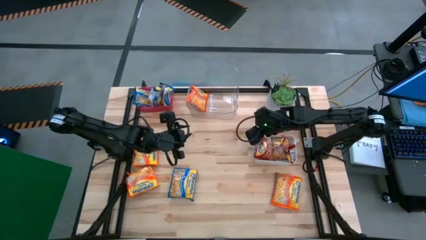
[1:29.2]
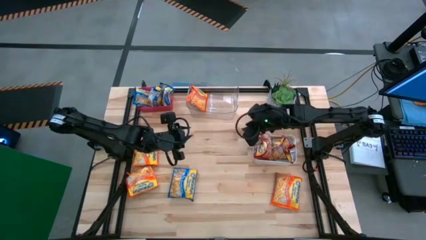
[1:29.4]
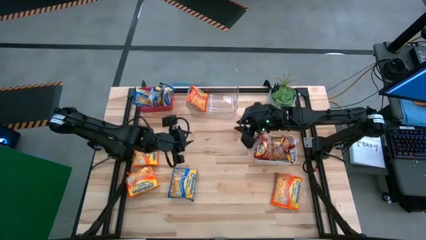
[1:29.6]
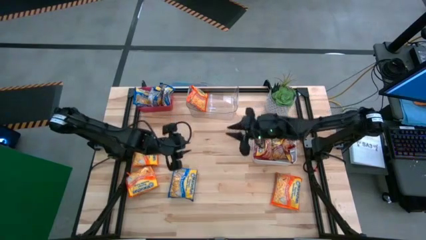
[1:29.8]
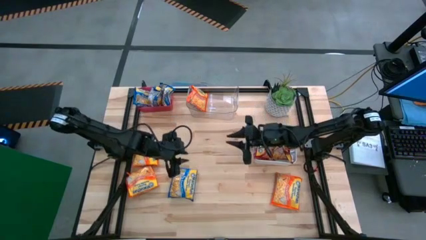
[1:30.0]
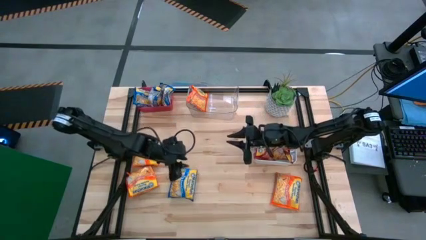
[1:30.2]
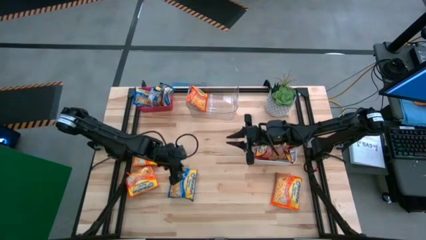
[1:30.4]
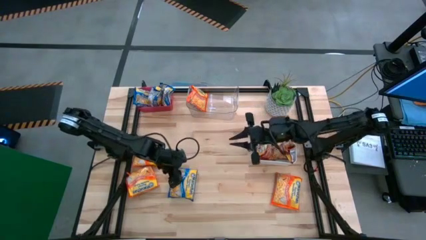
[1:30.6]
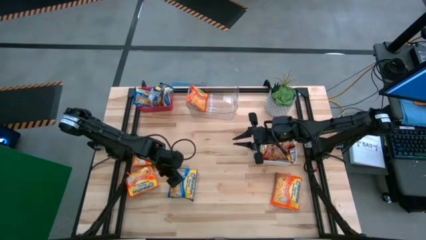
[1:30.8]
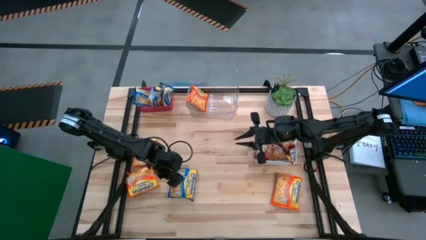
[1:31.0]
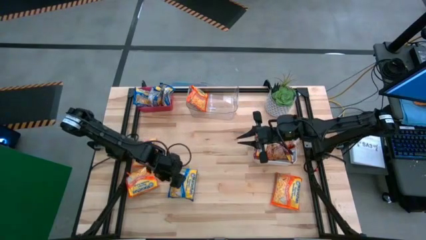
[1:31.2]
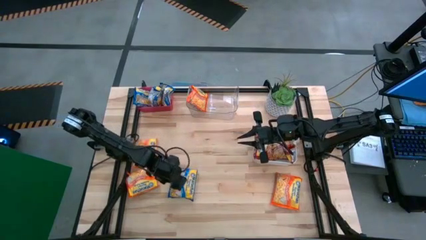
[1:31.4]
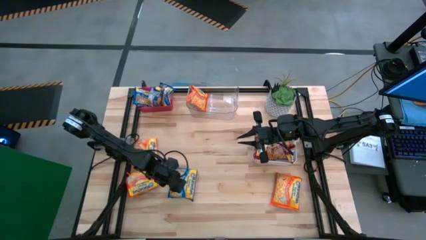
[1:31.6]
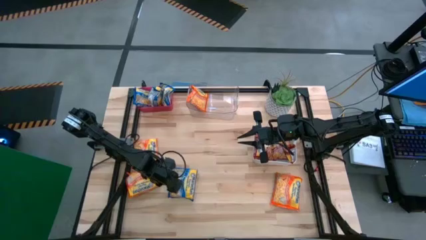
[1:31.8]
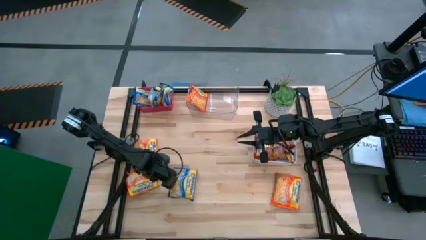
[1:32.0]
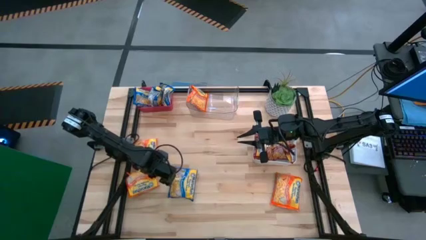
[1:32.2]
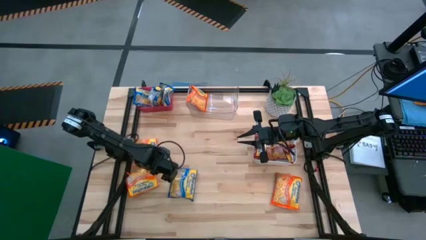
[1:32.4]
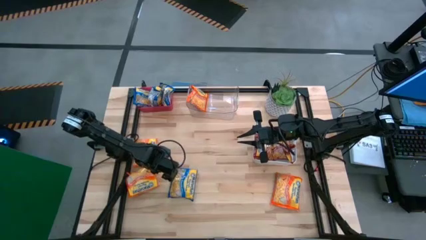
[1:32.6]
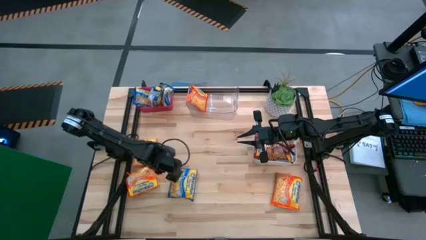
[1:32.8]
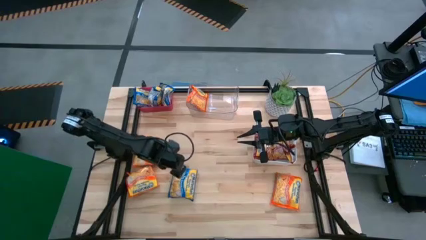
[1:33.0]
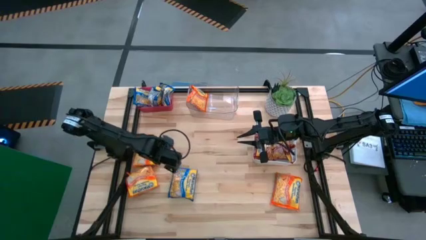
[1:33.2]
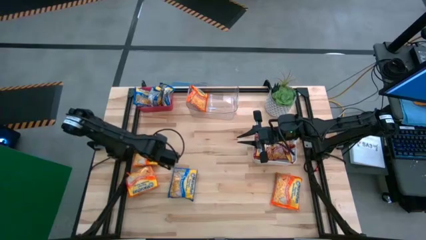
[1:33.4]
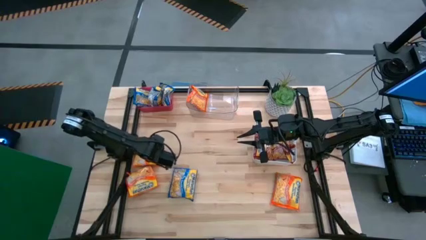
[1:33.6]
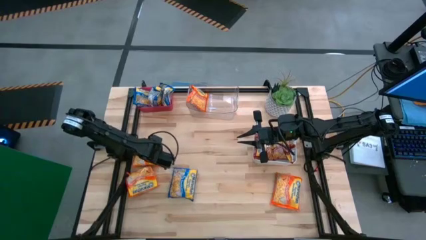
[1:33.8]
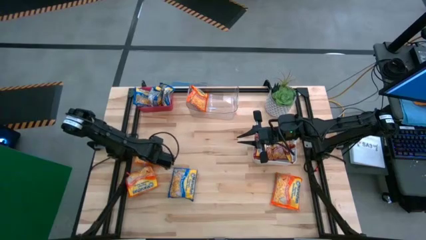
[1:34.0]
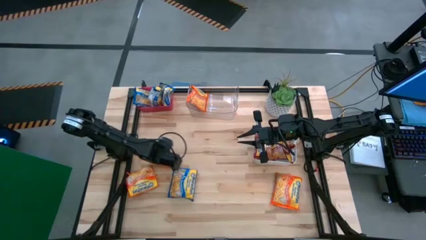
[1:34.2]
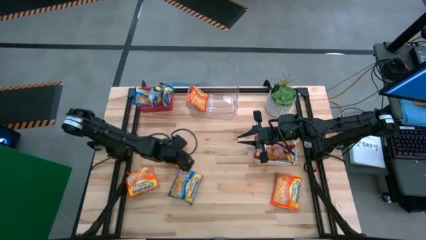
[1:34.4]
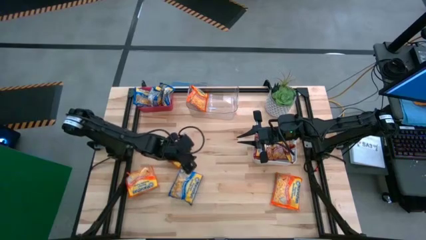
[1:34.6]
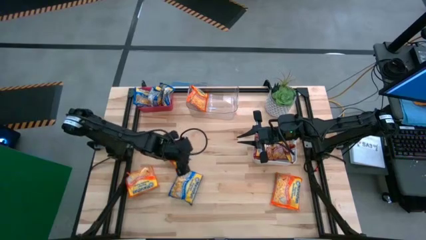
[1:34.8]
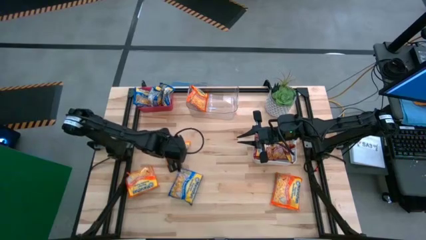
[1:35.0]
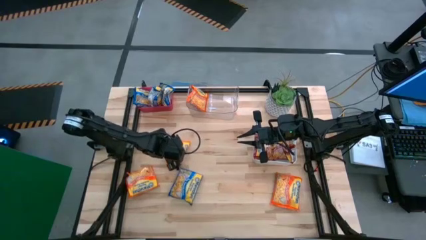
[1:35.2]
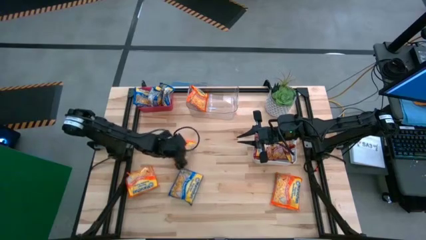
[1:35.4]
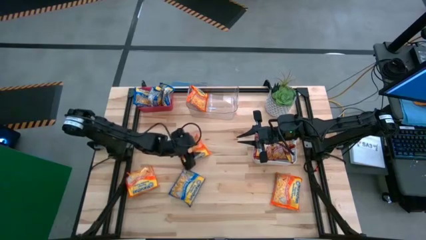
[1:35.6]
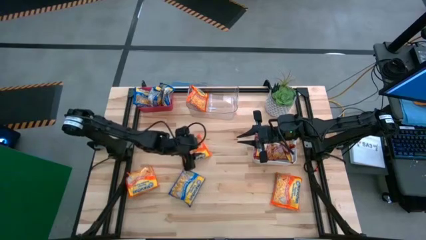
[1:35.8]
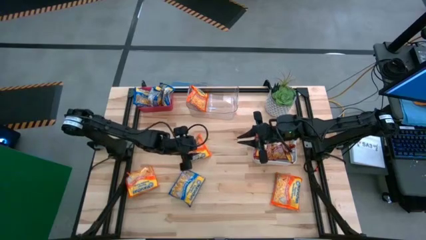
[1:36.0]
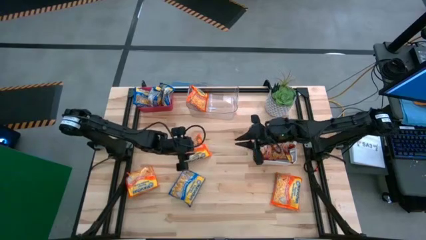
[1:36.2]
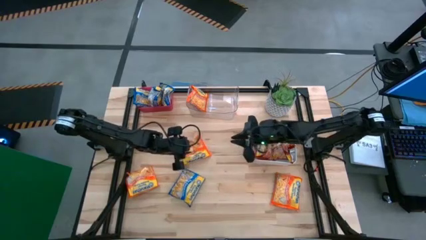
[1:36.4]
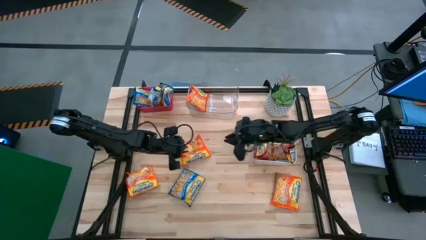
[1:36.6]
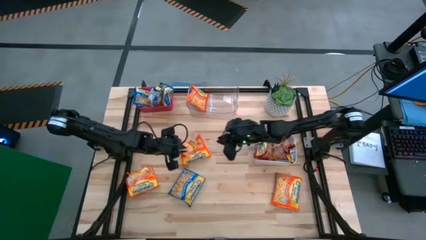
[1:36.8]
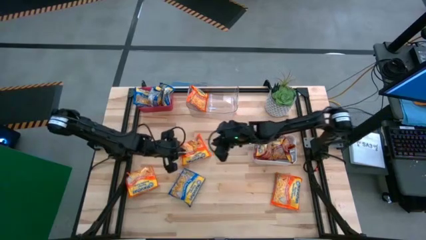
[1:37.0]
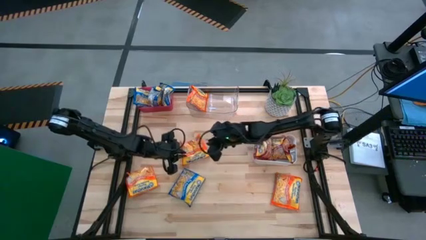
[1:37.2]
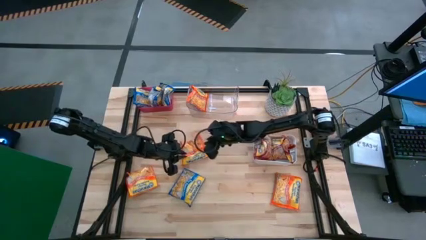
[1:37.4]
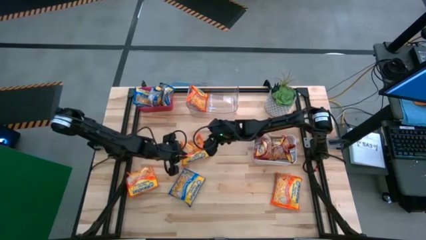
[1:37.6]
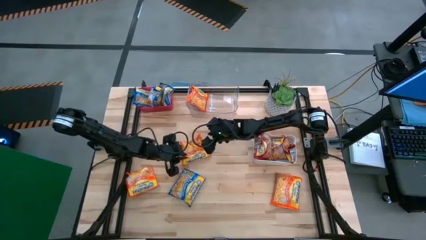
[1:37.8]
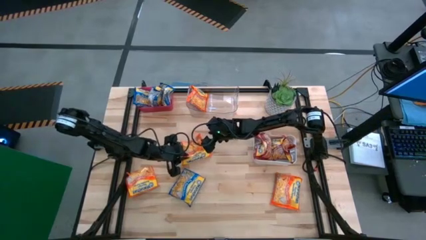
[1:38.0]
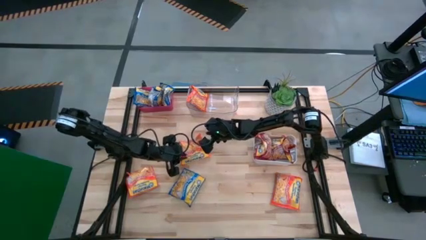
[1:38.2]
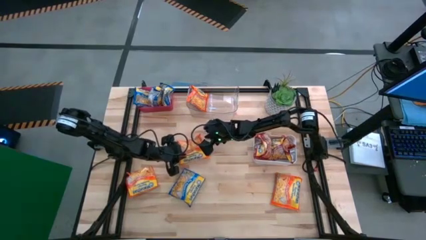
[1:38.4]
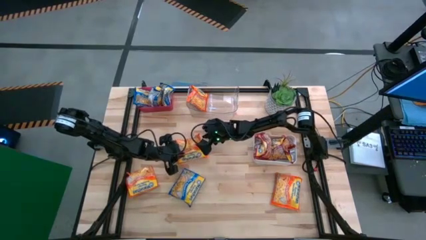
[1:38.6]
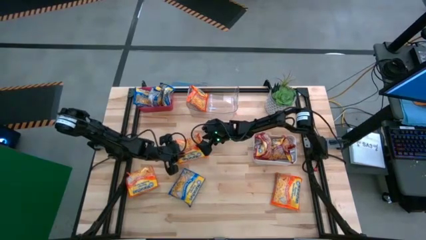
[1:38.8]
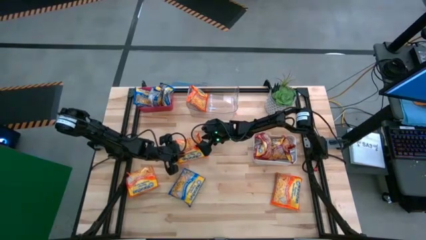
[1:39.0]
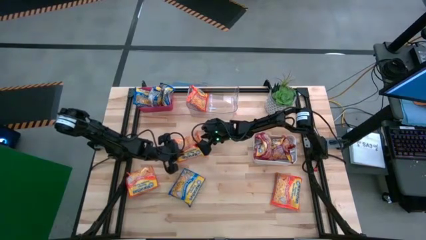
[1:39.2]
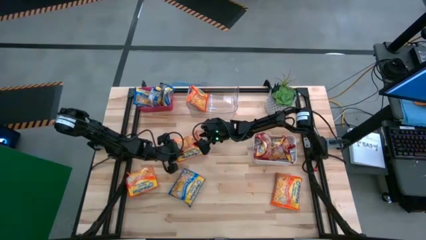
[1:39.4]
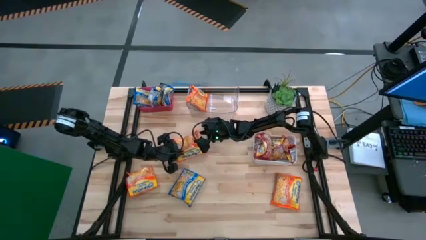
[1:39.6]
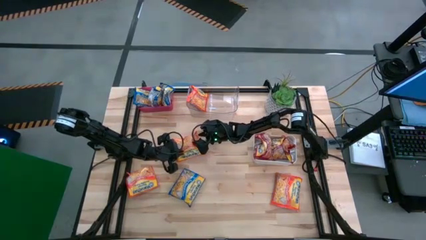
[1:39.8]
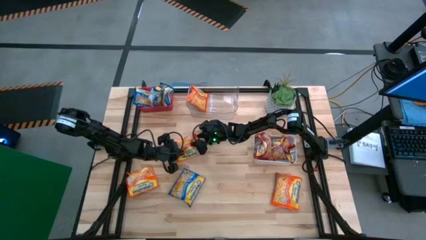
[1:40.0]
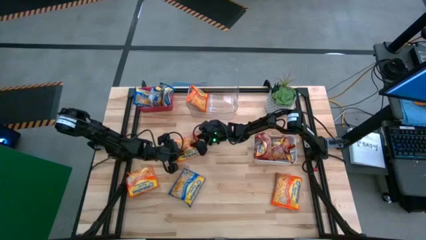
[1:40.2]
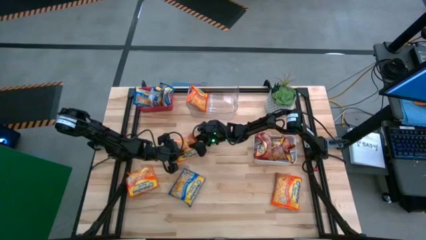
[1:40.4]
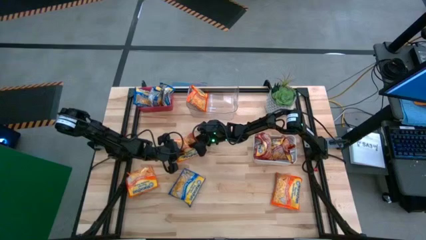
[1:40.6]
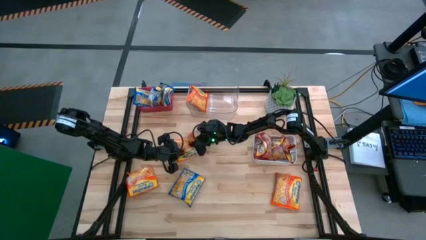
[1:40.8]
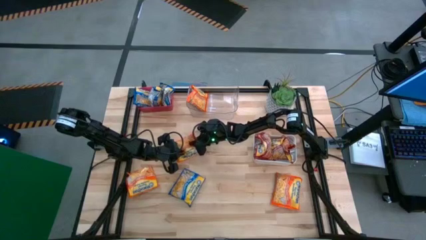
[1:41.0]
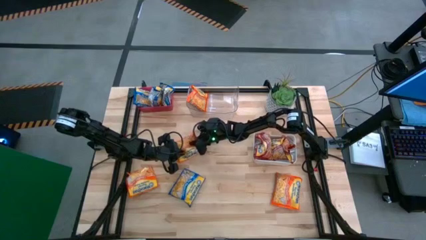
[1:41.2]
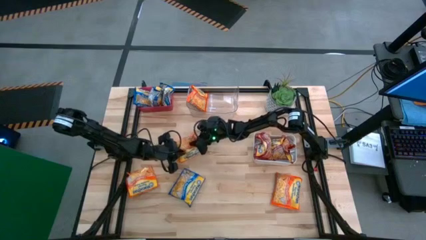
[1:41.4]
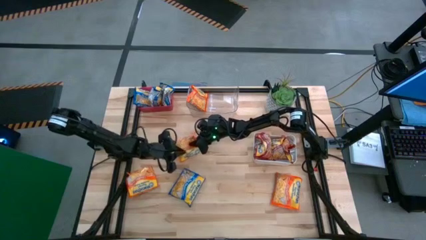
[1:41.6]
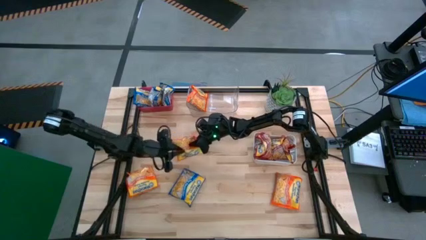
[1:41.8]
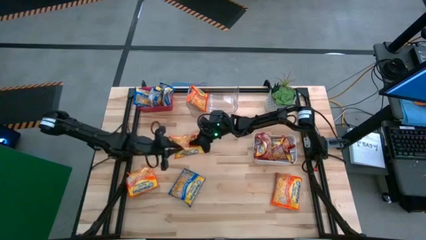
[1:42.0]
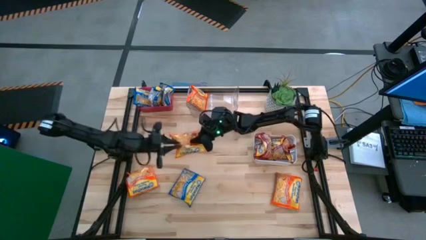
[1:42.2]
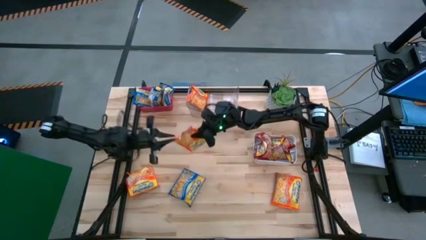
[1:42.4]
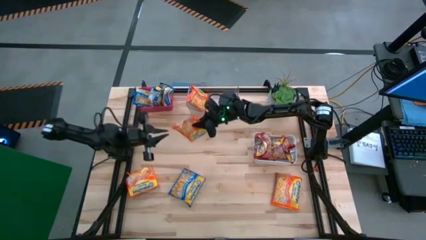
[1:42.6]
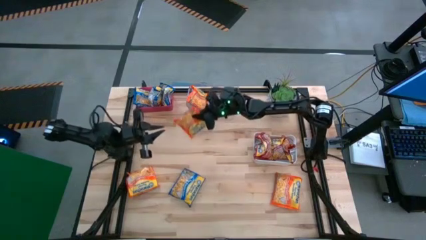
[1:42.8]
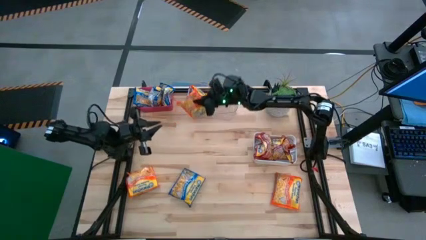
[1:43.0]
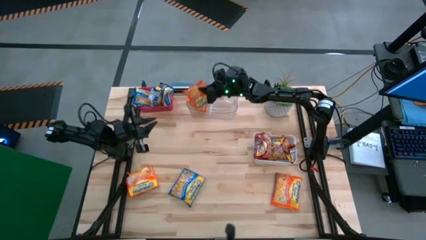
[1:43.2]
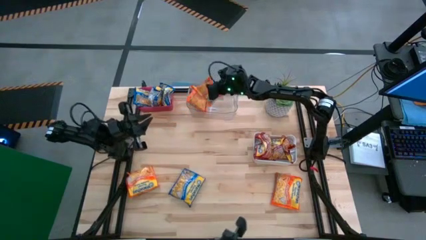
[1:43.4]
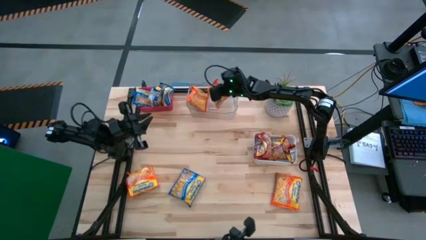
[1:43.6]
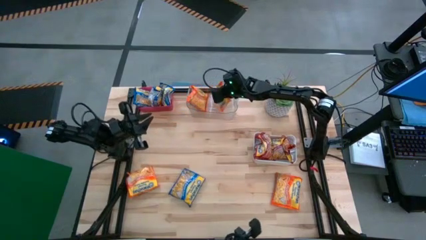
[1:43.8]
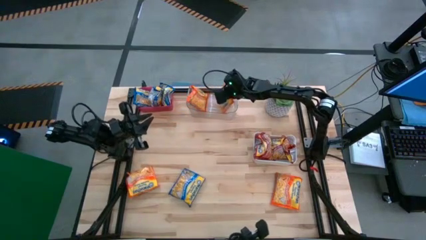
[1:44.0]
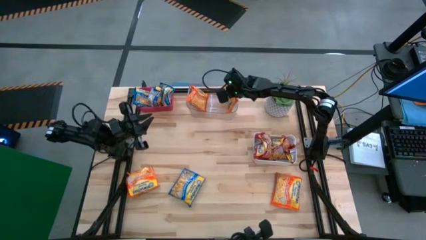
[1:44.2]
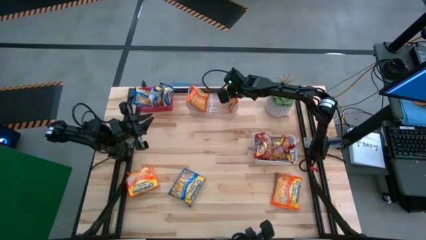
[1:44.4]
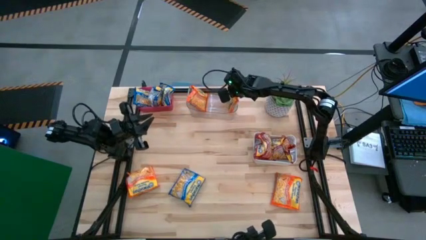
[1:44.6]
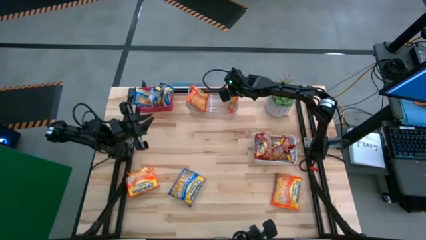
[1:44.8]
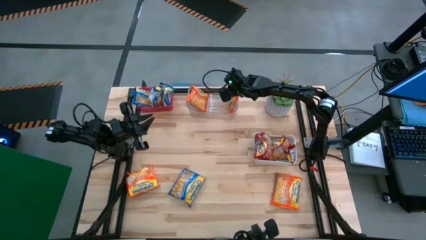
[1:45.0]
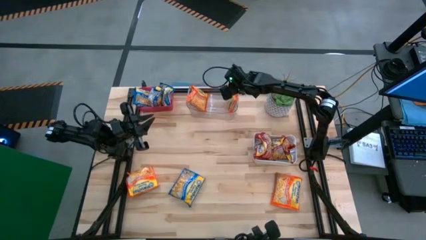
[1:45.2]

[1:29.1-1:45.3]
Task: Sort Maruchan noodles
Put the orange noodle pack into the transparent bin
